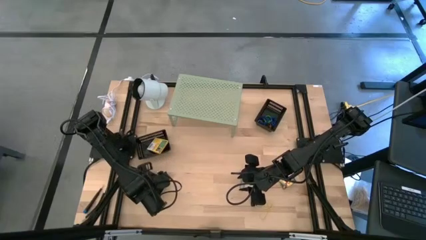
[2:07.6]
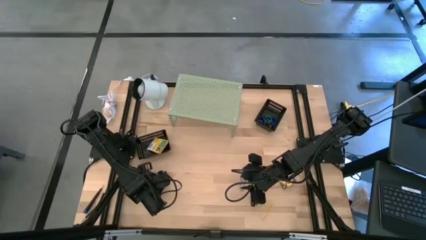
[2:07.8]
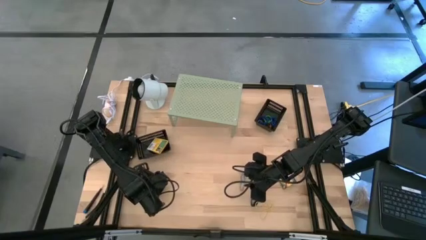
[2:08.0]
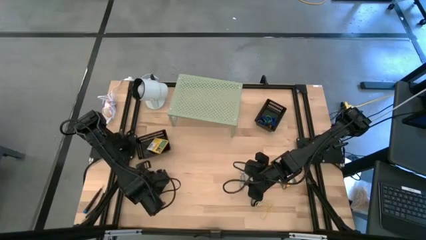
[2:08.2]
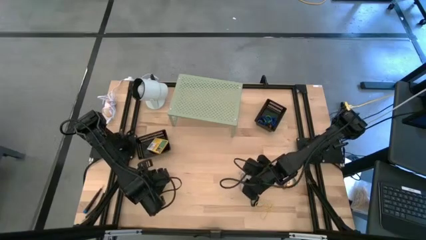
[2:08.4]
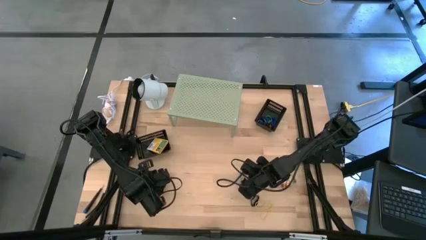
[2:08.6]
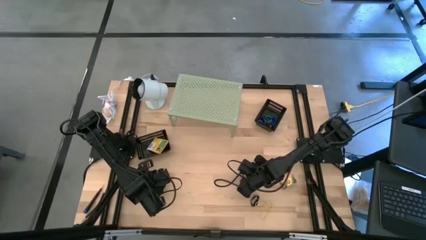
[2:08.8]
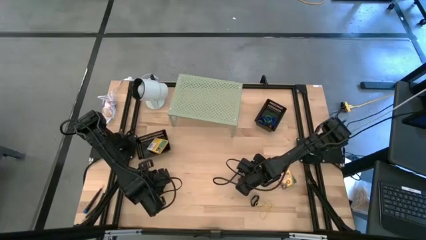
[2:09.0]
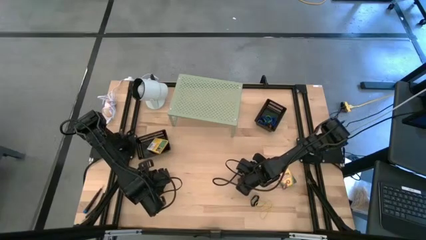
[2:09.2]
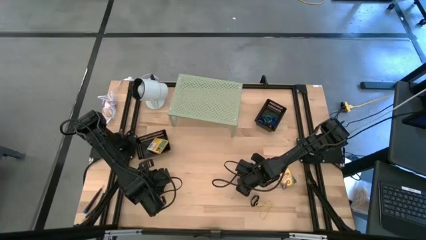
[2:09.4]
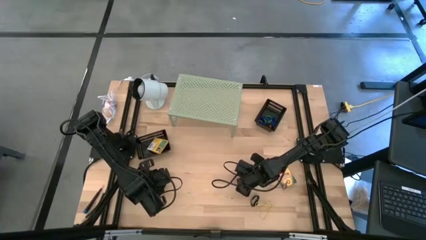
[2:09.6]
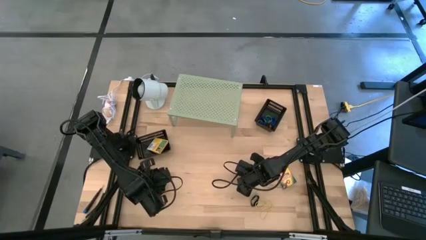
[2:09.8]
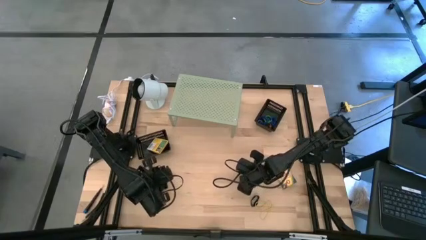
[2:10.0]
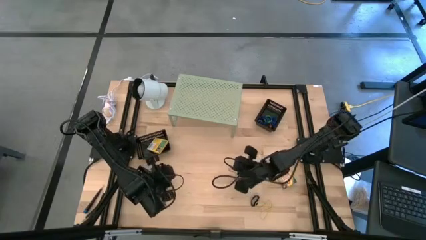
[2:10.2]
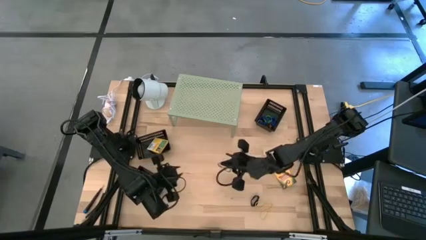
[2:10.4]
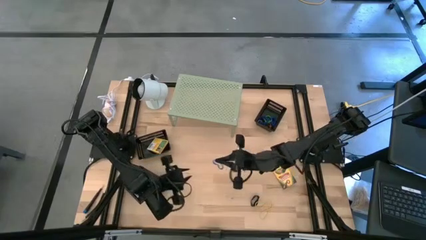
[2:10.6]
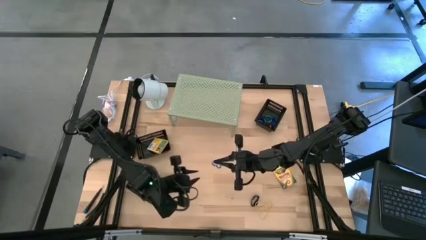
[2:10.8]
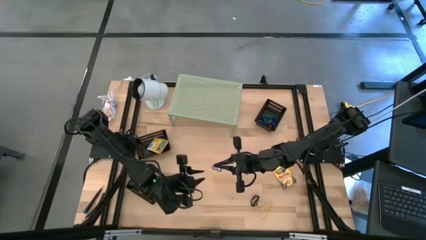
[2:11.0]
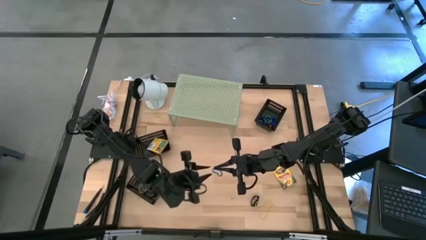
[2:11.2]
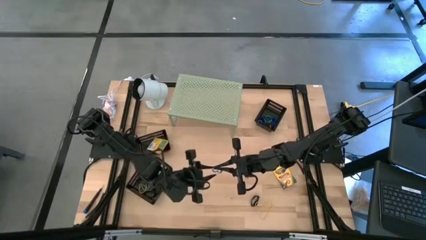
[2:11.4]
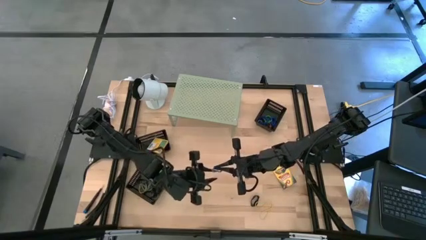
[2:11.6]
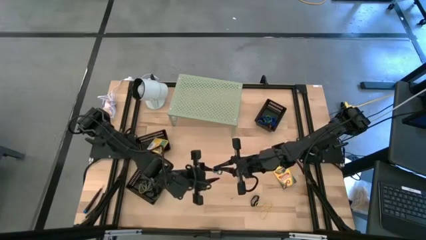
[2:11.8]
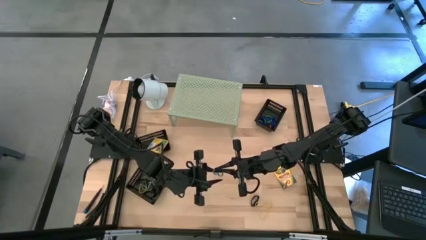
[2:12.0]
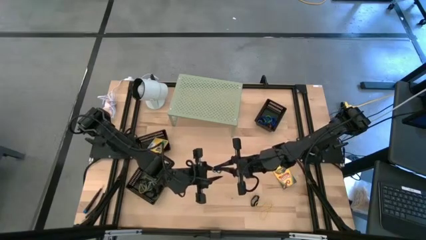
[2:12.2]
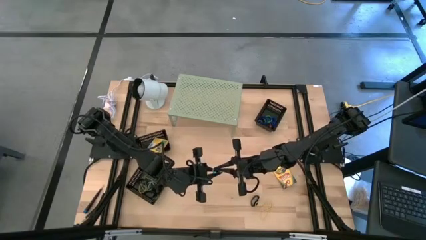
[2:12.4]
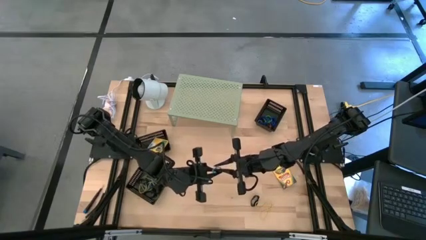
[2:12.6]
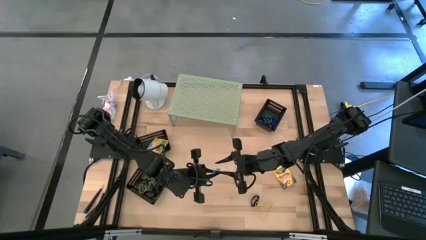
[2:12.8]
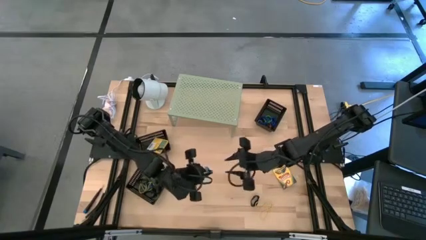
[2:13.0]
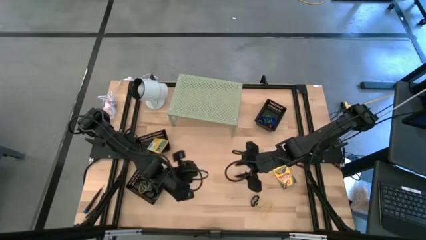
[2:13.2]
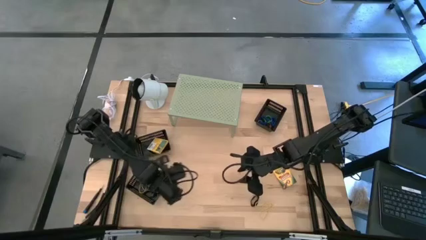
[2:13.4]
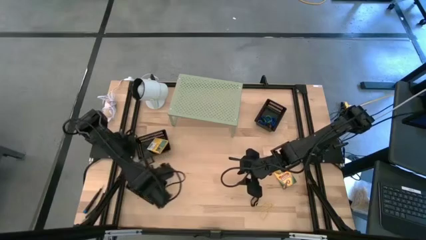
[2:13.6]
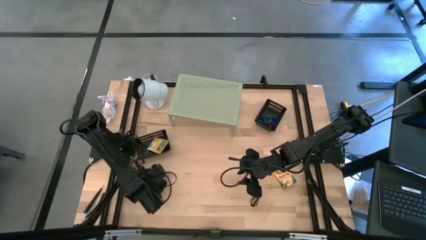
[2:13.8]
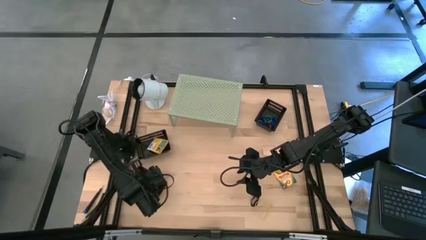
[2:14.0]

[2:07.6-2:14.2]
Task: Pick & Place Office Desk Supplies
Put the blue rubber band into the bottom left black bin

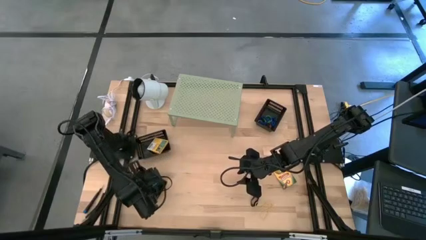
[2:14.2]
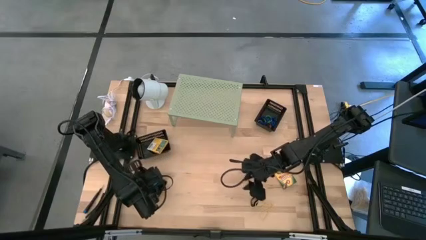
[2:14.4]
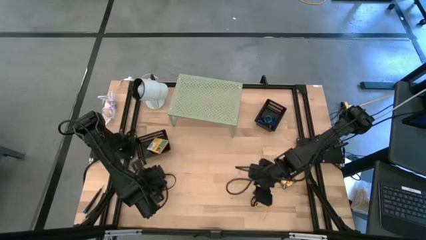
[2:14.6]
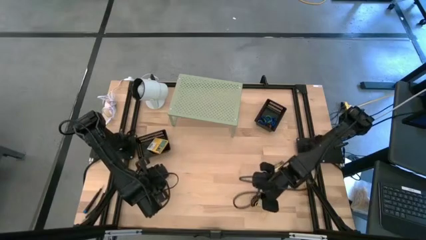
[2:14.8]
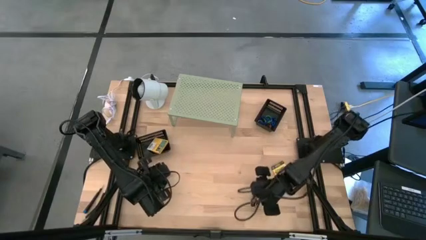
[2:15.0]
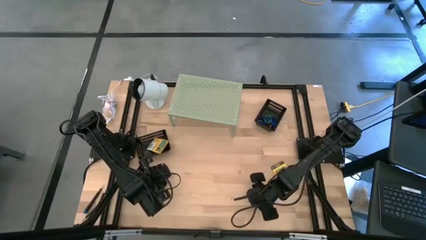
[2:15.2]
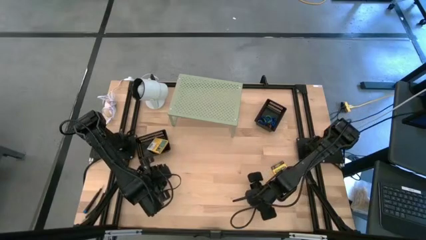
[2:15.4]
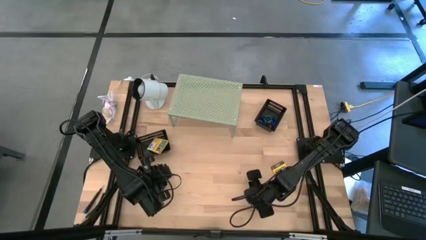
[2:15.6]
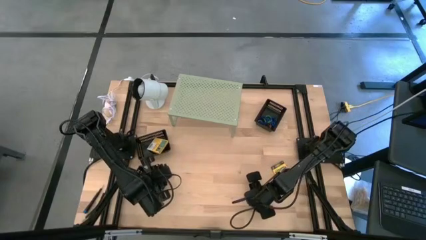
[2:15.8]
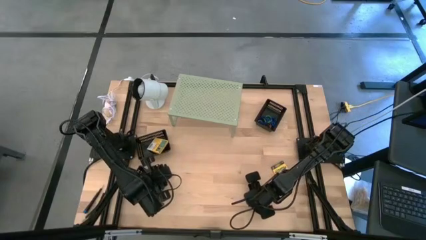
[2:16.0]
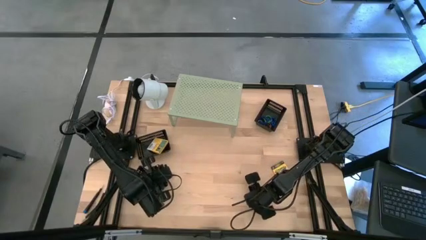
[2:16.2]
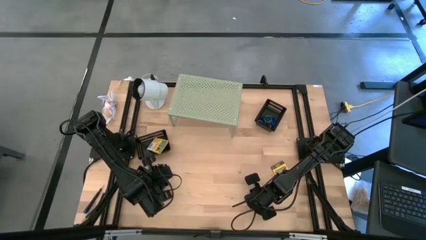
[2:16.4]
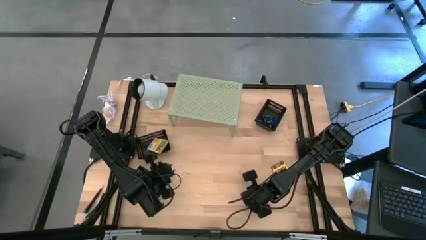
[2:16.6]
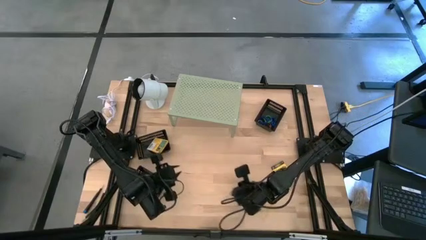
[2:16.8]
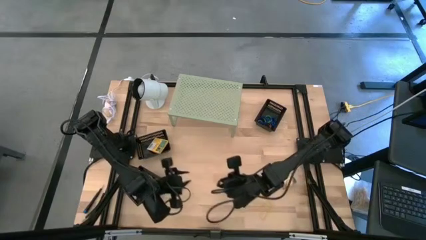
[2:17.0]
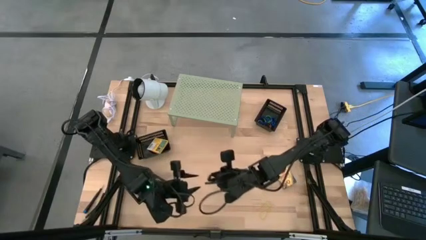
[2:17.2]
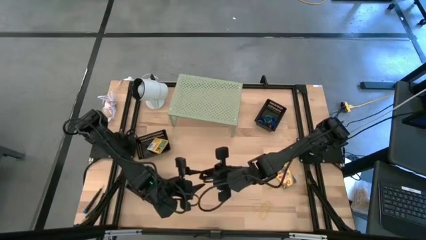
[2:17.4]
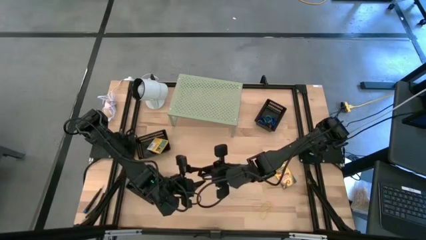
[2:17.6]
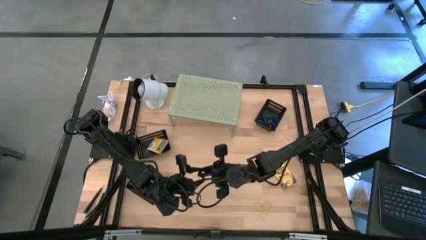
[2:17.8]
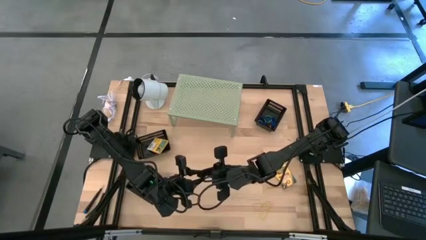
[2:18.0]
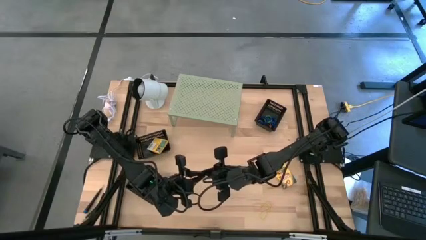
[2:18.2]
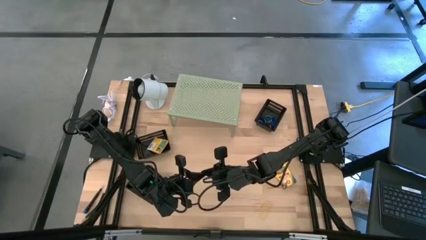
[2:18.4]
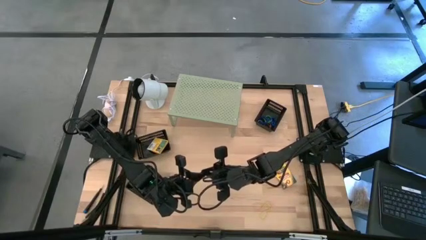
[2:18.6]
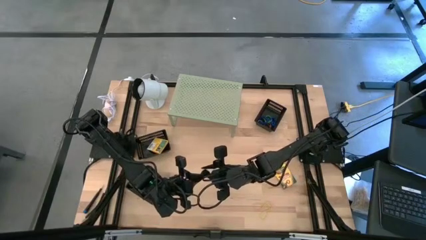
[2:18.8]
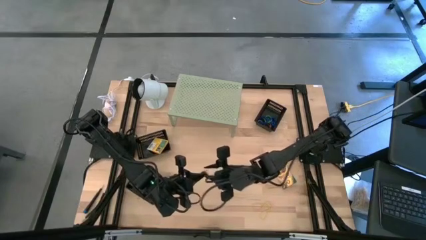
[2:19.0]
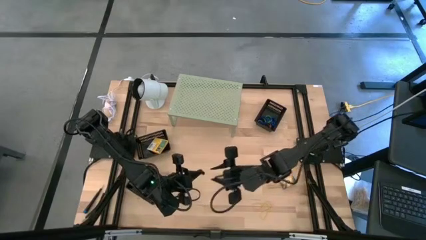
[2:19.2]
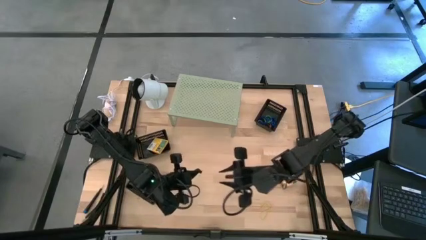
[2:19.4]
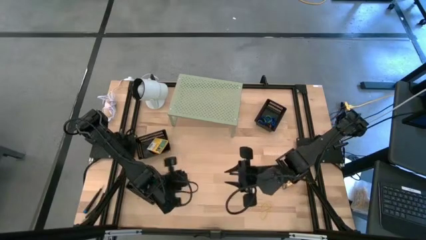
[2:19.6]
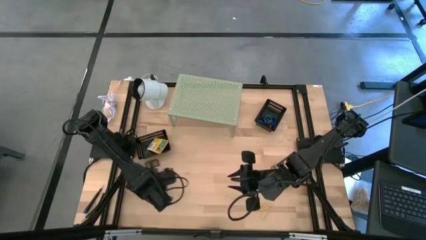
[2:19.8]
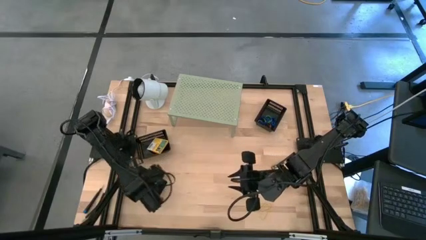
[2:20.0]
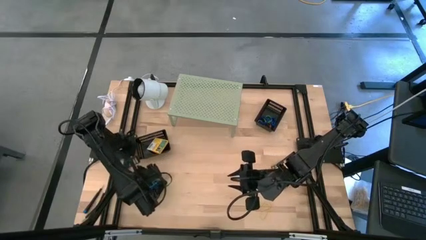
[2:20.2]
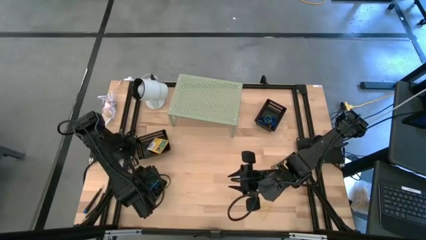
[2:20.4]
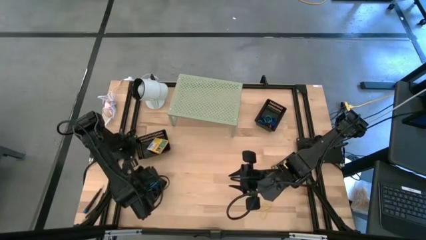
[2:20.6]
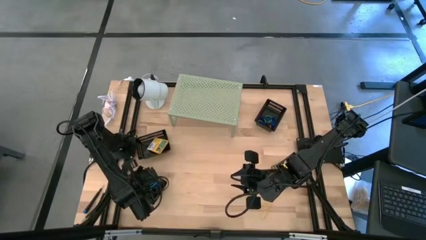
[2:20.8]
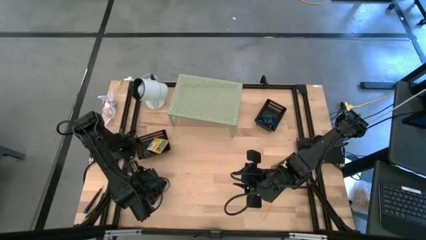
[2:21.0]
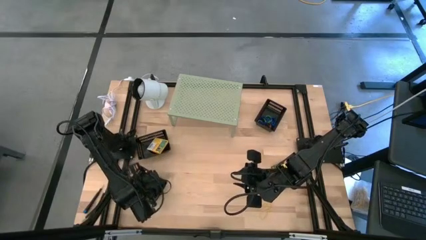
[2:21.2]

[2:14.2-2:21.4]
Put the black rubber band into the bottom left black bin
